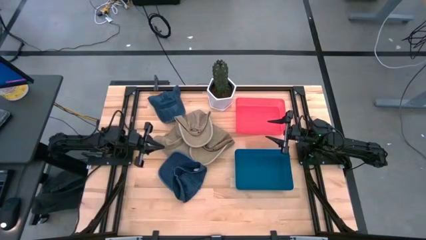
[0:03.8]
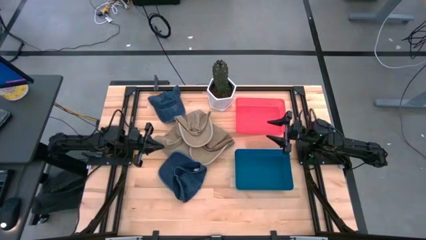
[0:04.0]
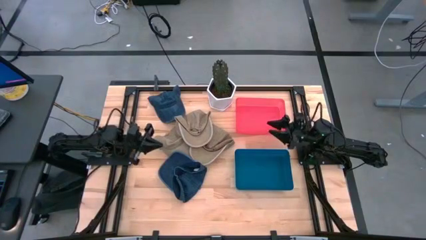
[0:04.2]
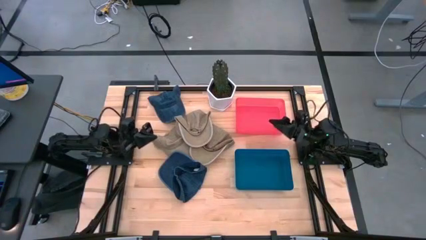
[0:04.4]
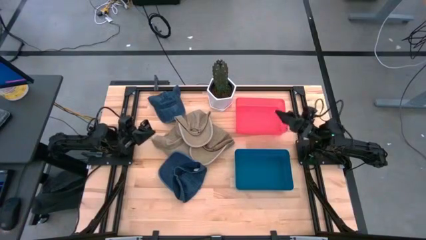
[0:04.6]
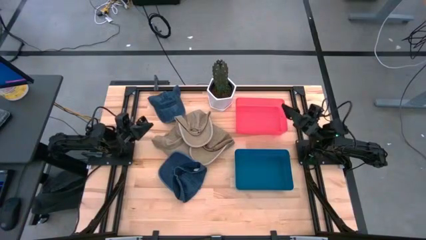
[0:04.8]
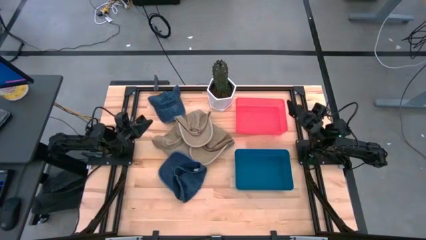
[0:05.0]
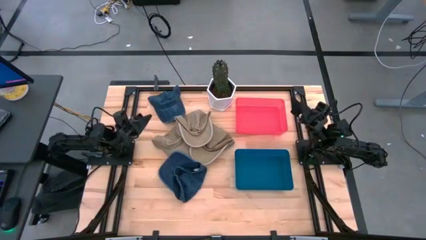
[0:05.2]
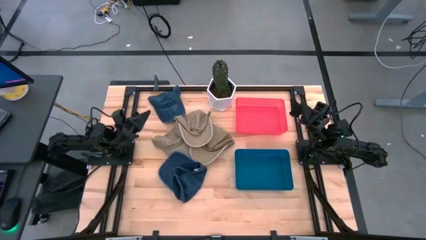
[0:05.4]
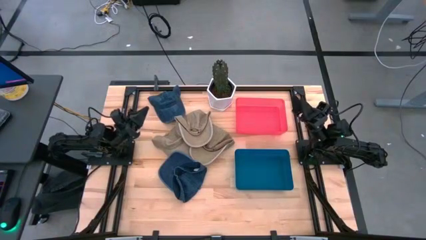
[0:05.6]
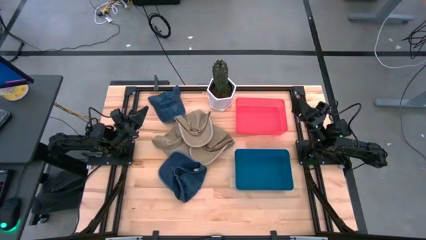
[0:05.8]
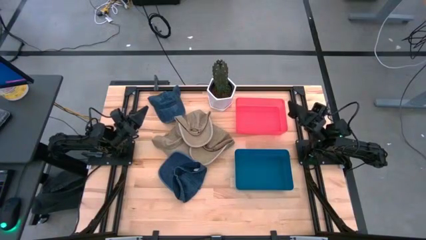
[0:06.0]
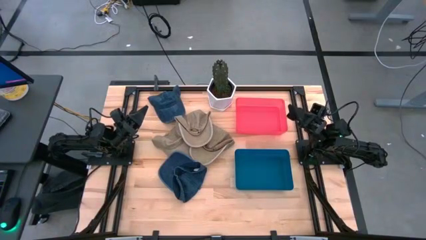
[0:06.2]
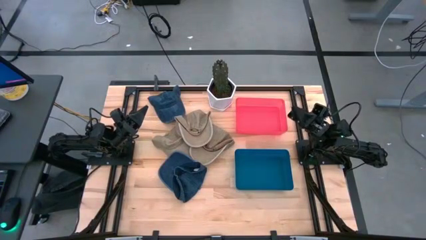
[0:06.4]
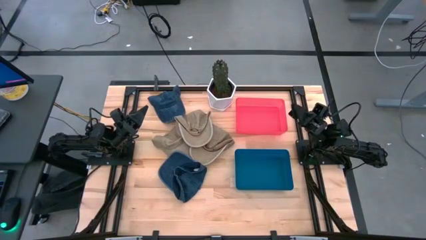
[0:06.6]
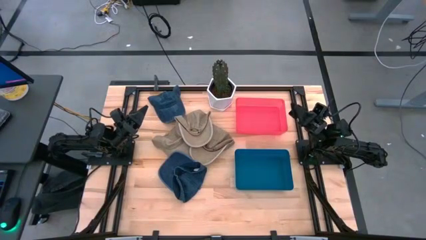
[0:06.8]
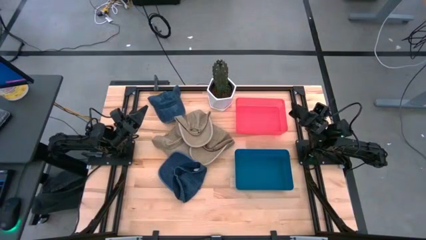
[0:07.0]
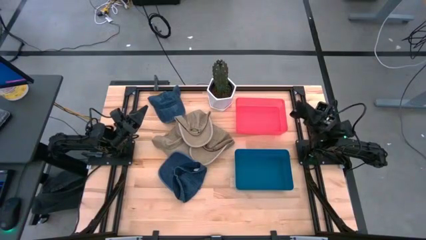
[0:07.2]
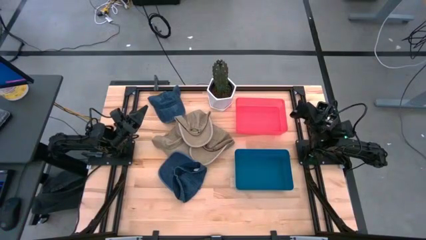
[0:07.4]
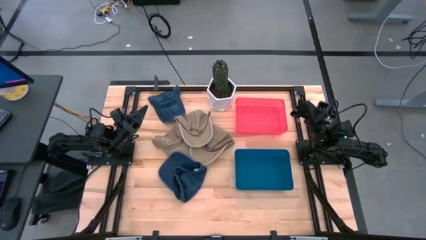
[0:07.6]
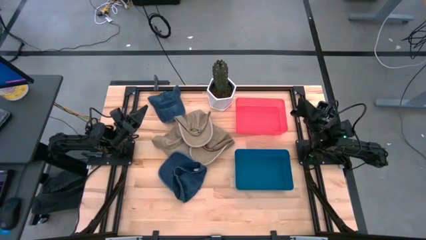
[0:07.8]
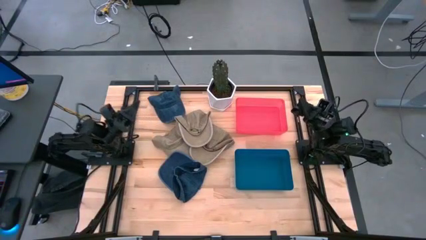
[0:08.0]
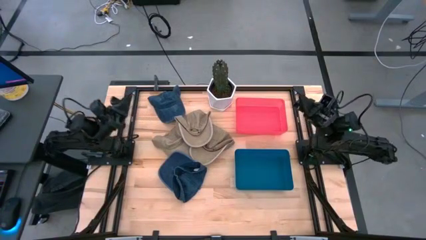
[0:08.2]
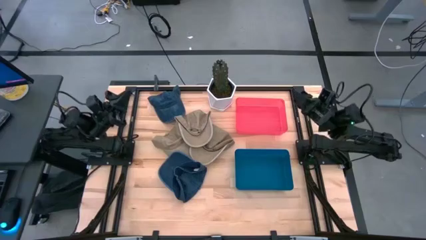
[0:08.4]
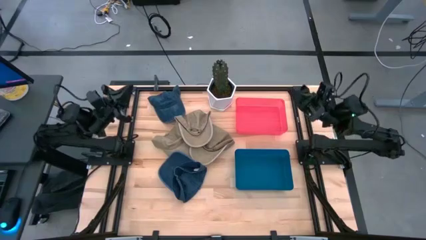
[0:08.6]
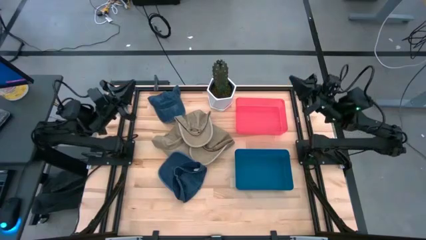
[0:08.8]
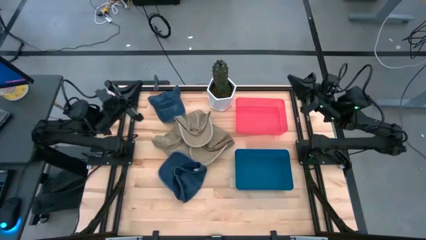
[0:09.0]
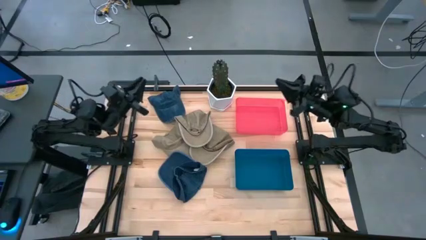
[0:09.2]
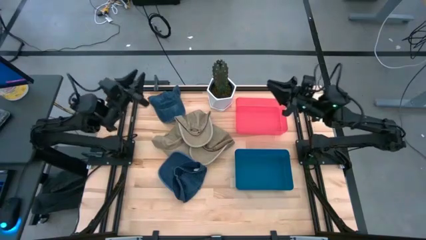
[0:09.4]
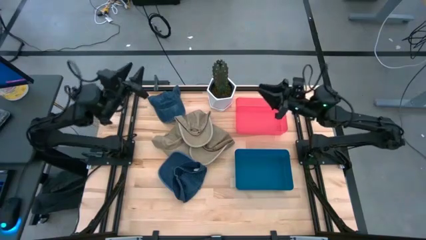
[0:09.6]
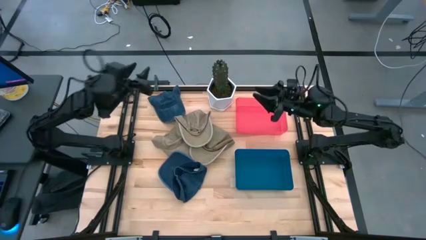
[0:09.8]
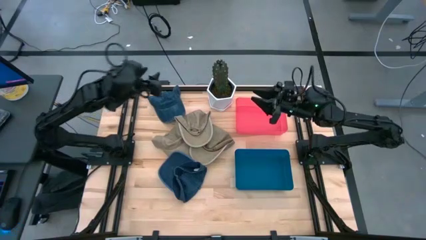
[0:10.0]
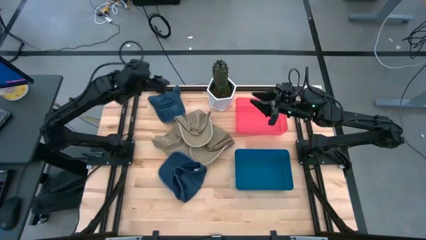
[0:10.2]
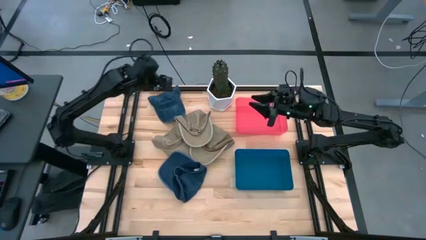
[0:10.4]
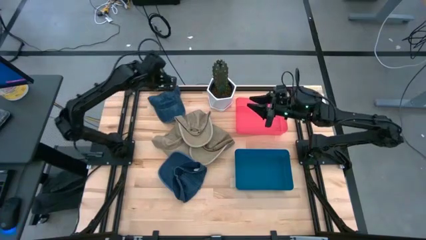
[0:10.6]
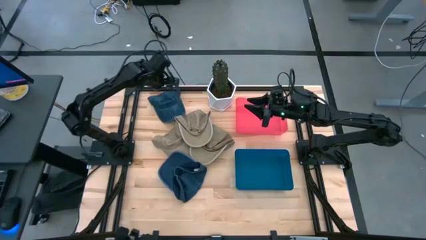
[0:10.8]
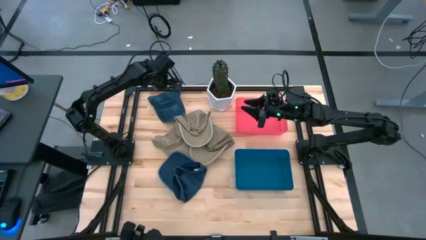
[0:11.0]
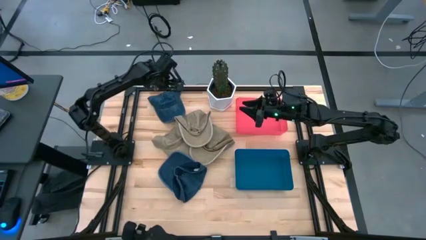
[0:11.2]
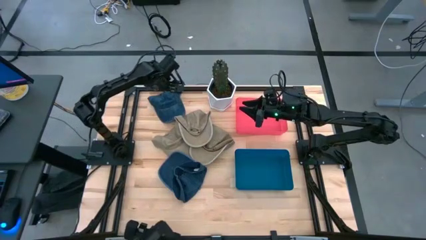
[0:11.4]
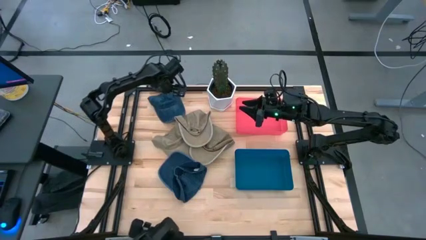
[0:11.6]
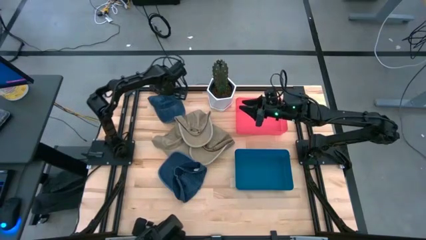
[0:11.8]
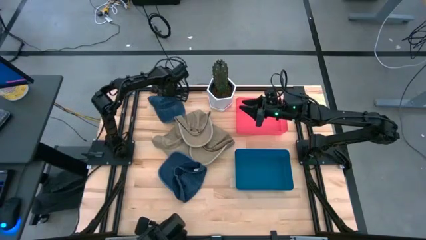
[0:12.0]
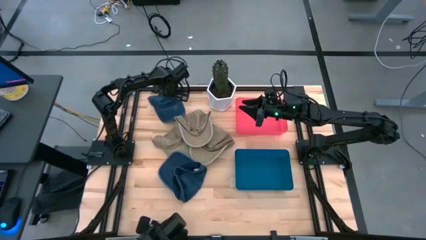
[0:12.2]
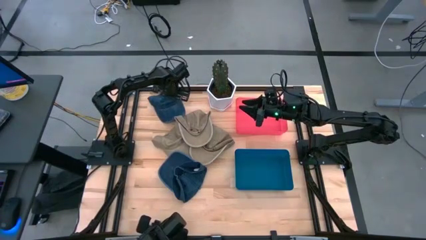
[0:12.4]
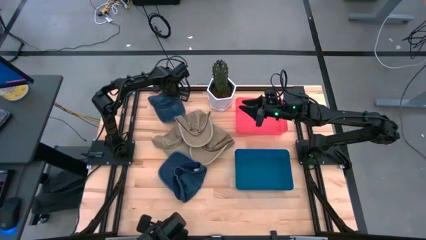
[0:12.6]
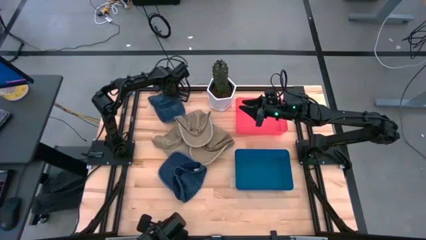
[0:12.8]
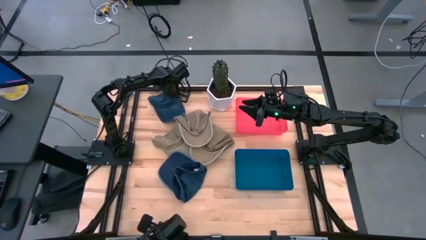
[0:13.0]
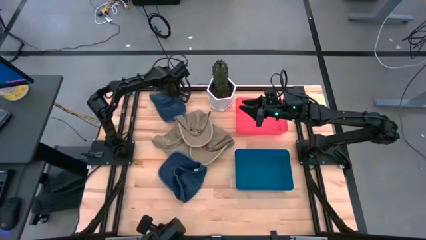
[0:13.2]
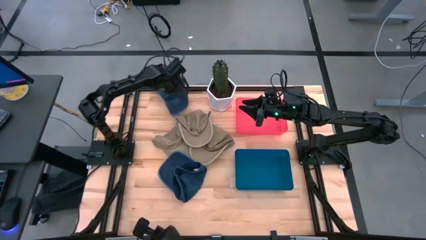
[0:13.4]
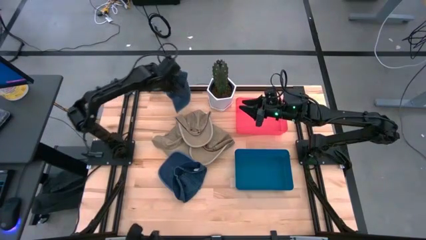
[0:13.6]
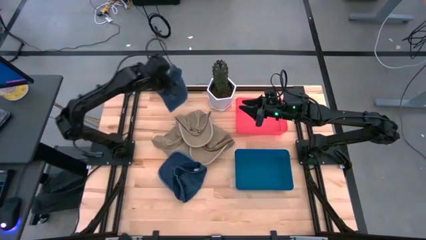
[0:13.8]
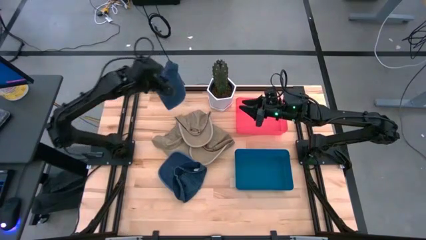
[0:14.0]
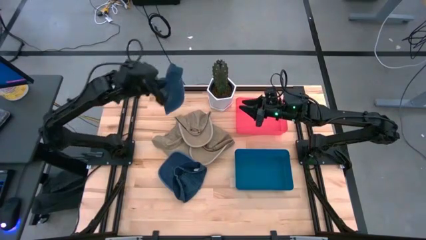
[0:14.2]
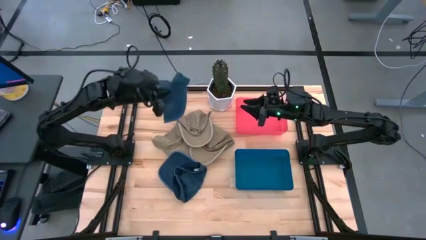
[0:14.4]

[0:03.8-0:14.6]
Task: Pick & Place hat
Put the top blue cap into the pink bin
